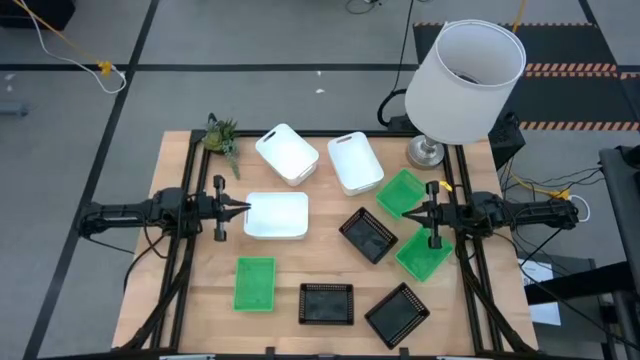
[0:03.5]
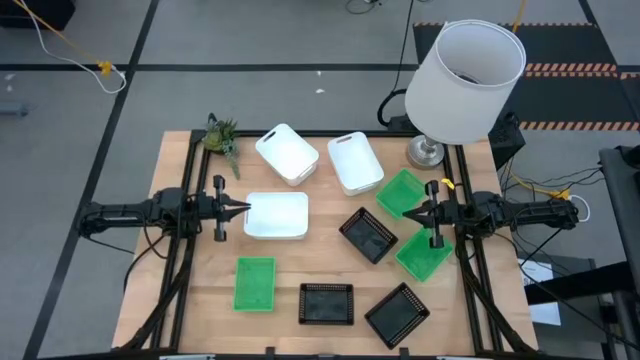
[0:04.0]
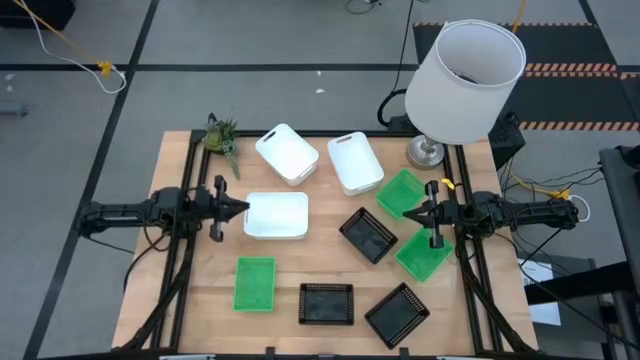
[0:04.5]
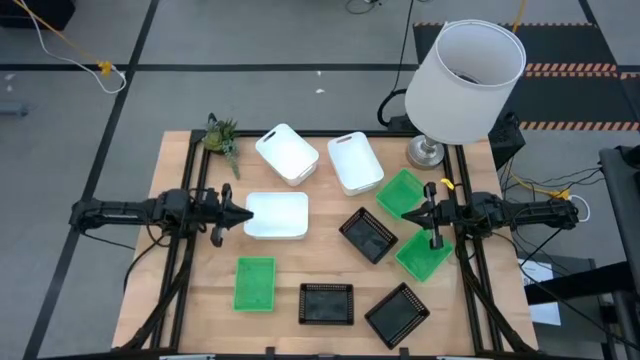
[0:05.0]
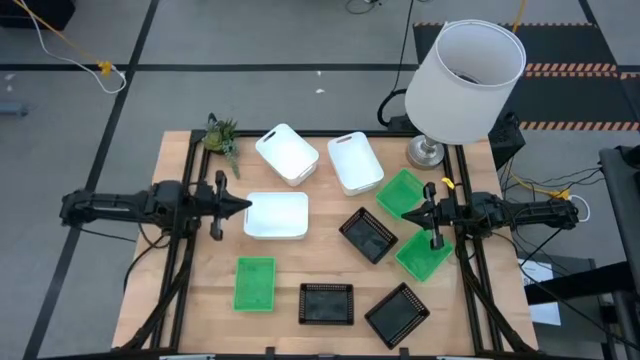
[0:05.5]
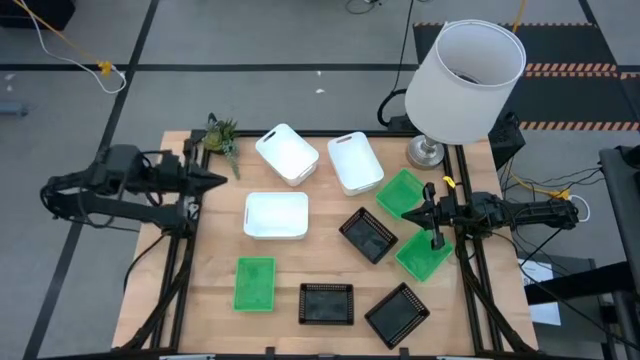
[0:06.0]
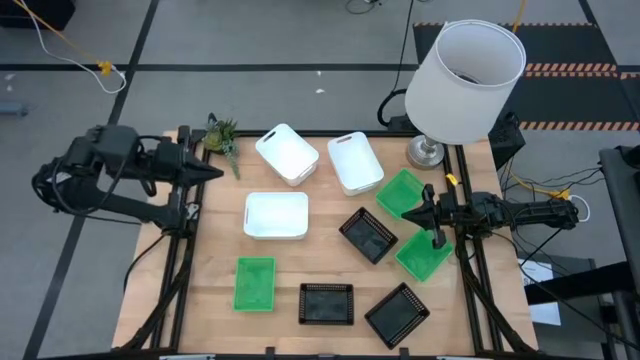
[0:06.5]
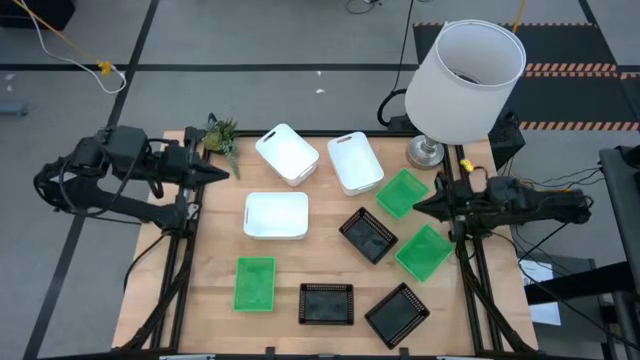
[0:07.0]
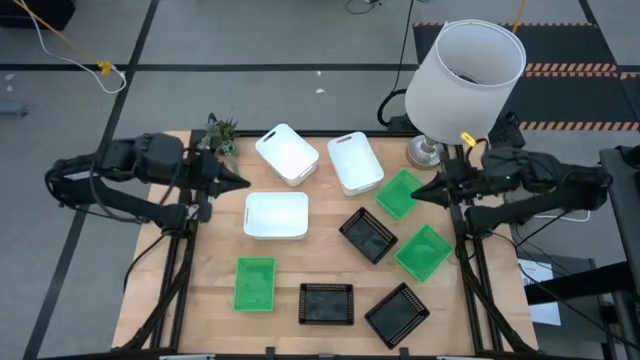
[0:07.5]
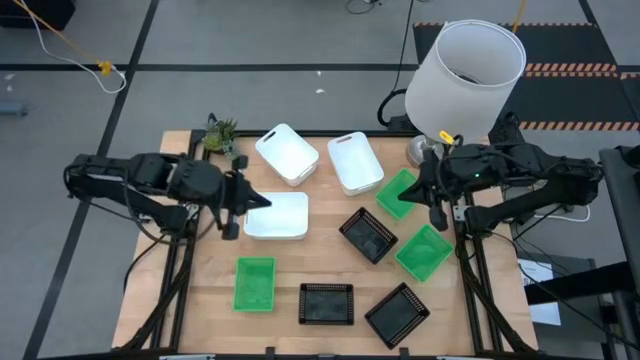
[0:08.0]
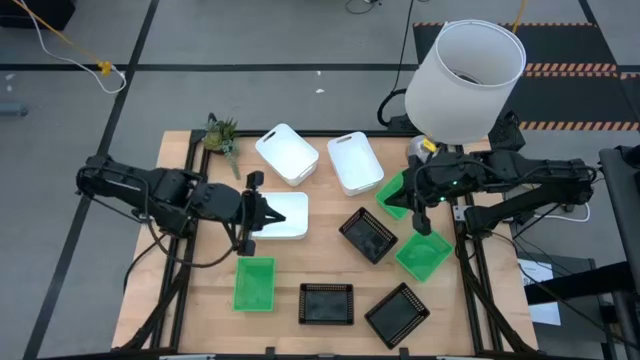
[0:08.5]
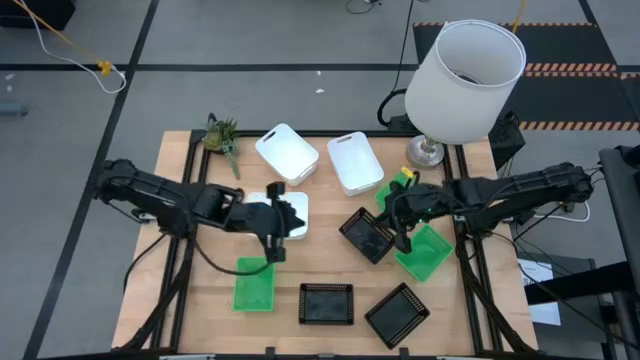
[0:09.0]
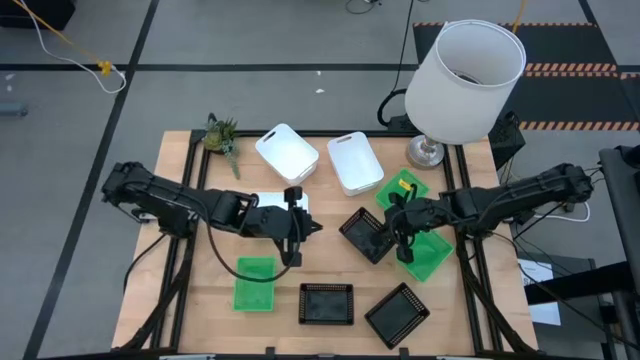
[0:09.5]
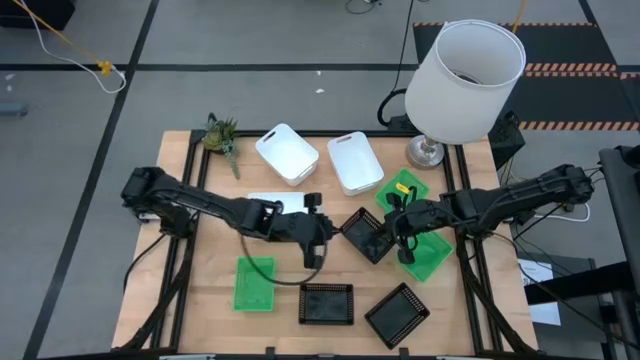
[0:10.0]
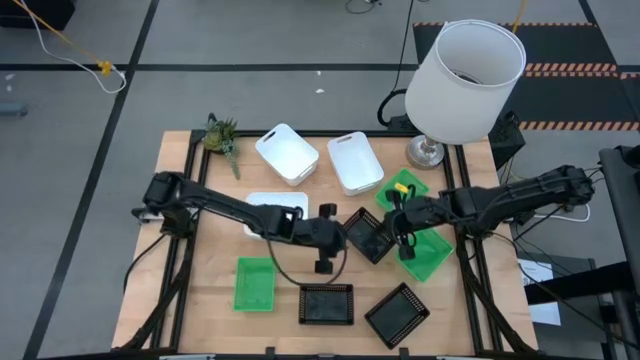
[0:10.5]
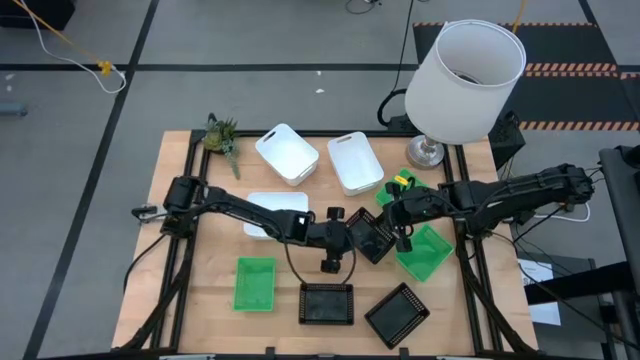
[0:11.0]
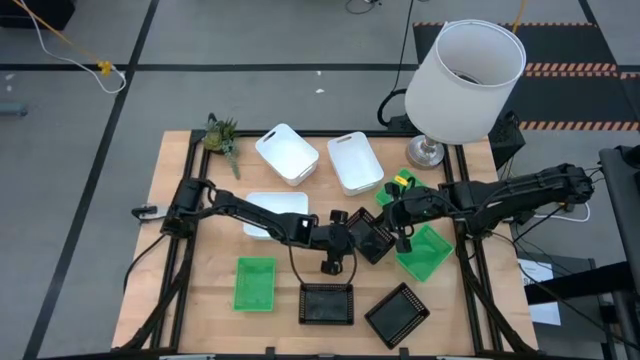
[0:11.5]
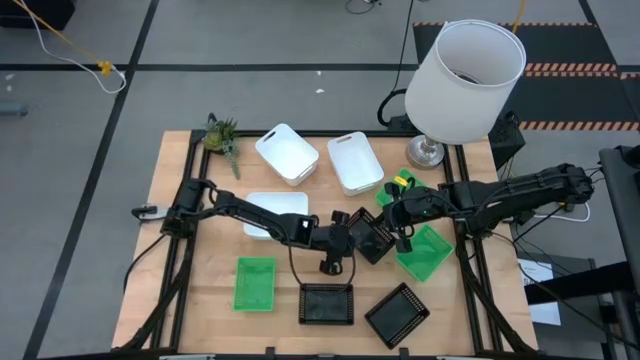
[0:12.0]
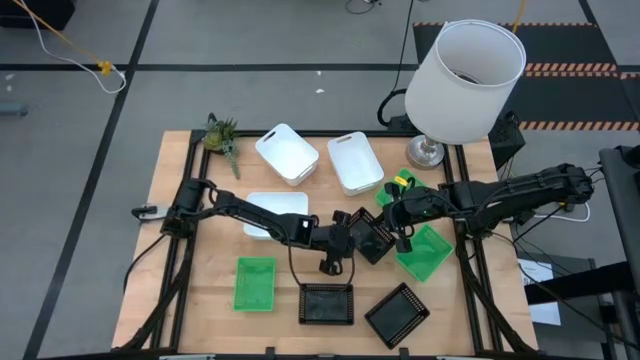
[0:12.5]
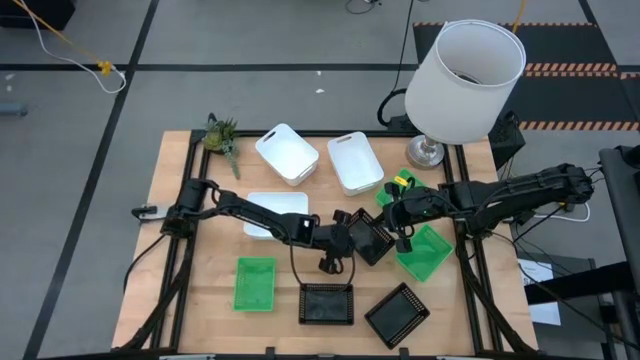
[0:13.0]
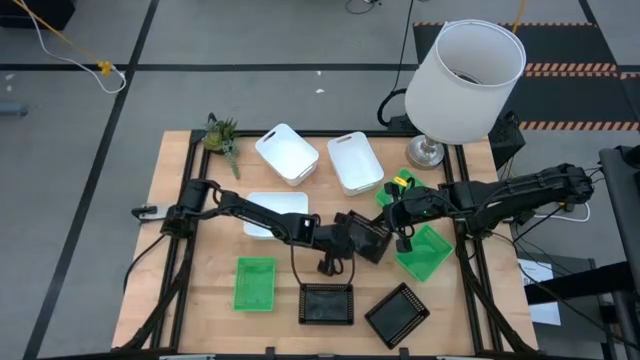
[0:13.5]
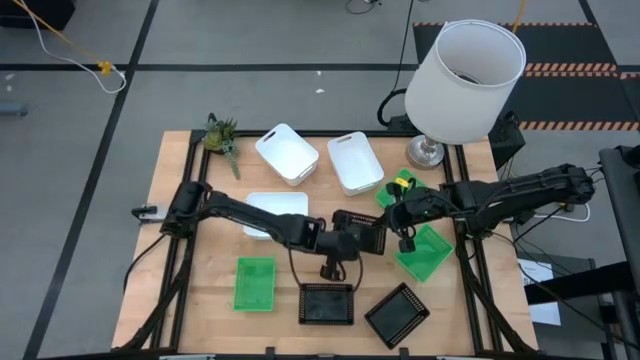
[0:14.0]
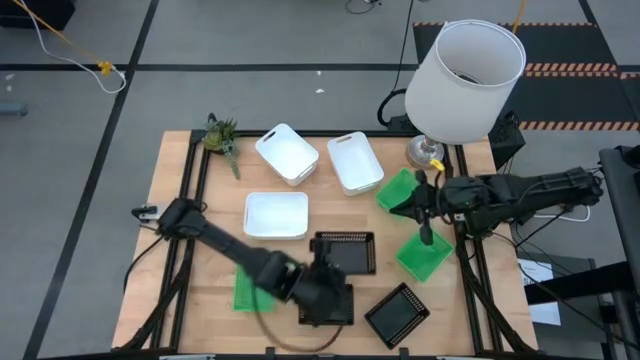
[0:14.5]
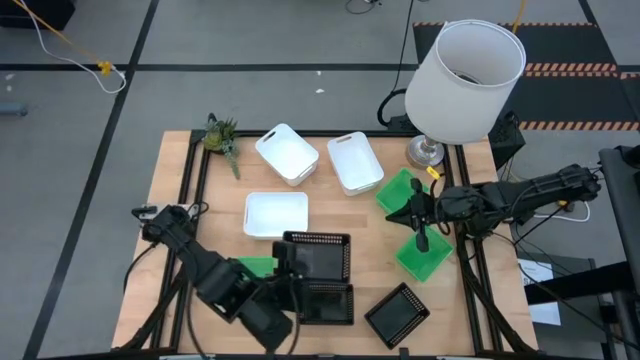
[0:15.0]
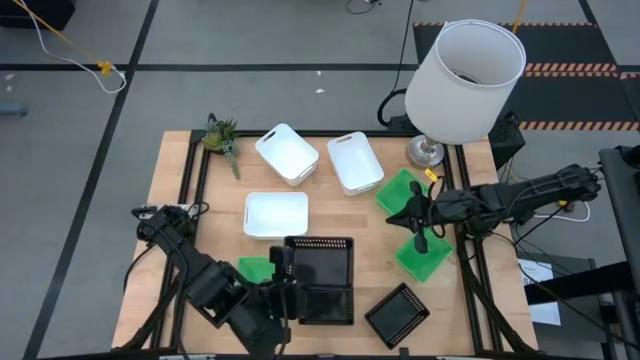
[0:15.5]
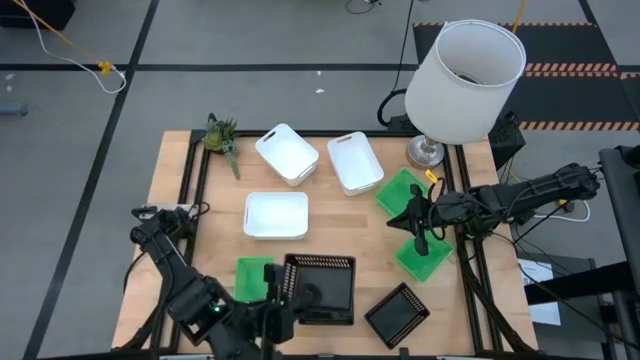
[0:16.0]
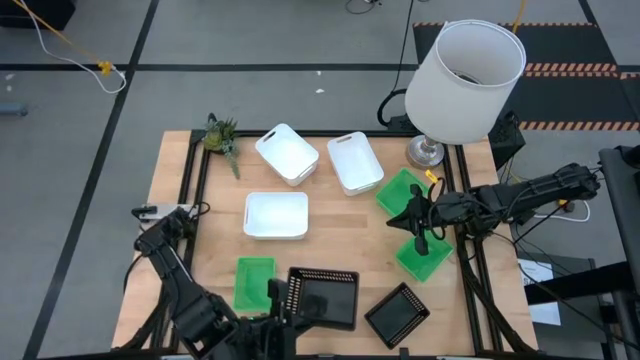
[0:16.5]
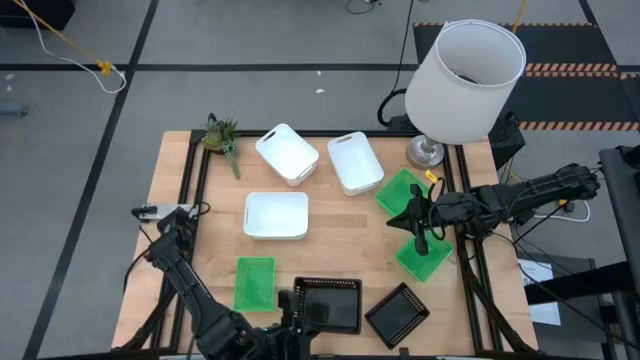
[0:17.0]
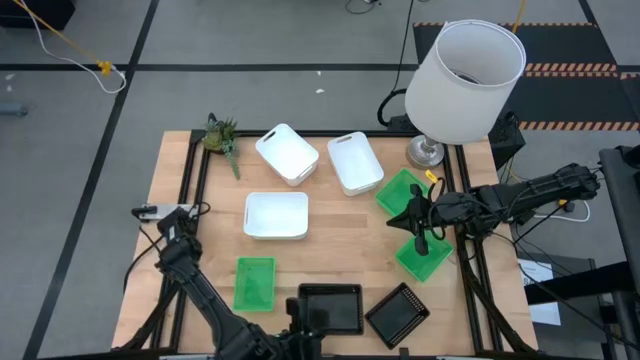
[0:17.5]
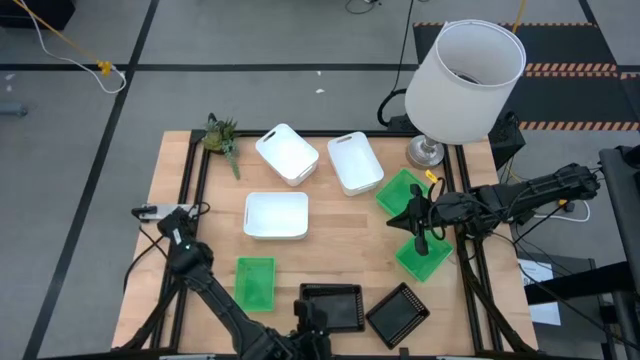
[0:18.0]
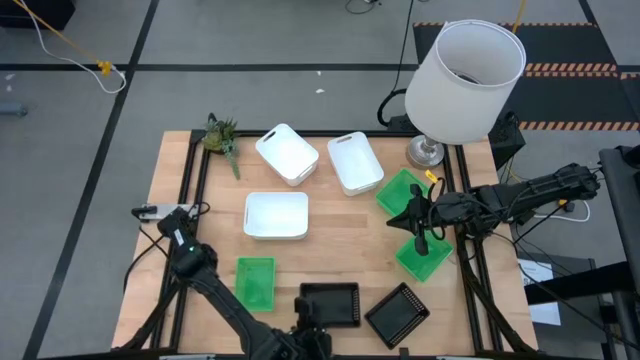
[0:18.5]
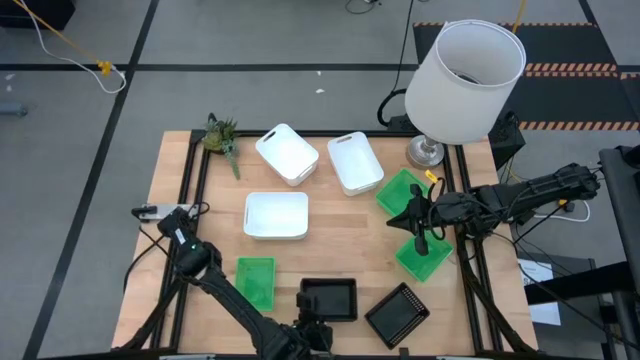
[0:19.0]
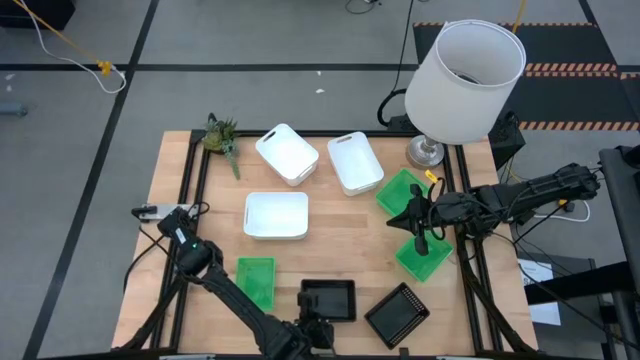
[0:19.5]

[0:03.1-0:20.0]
Stack the top black bin into the bottom left black bin
